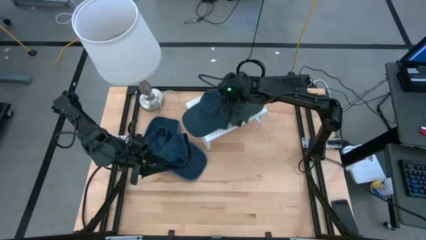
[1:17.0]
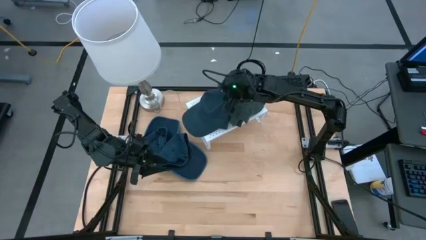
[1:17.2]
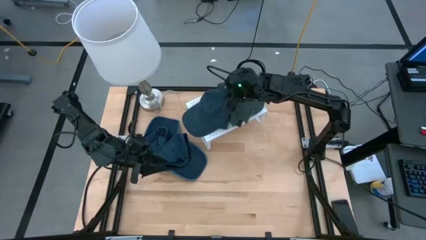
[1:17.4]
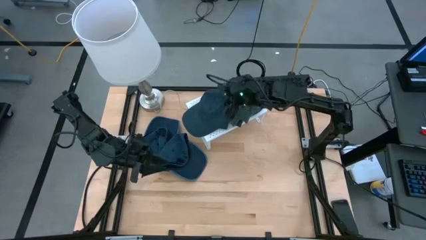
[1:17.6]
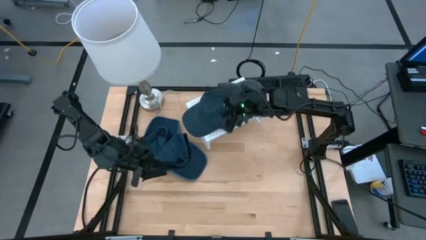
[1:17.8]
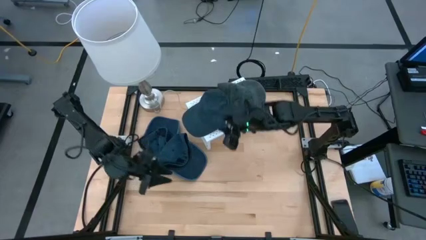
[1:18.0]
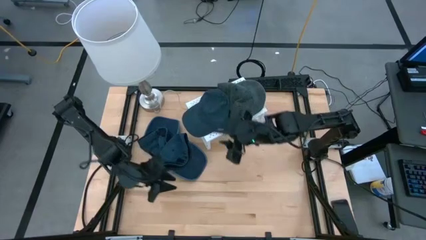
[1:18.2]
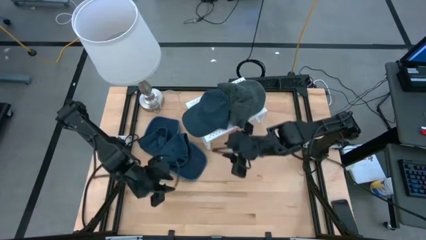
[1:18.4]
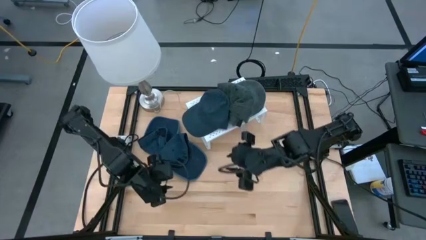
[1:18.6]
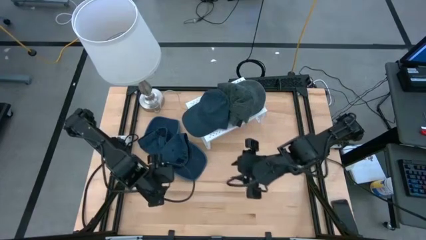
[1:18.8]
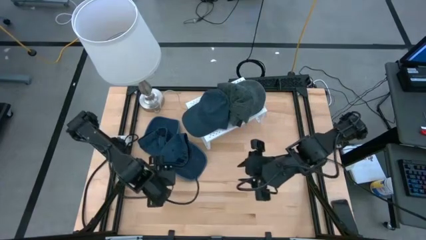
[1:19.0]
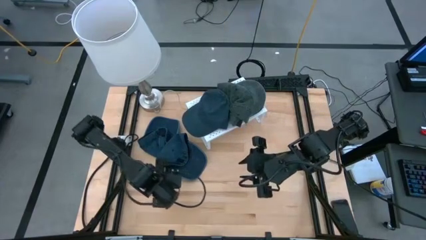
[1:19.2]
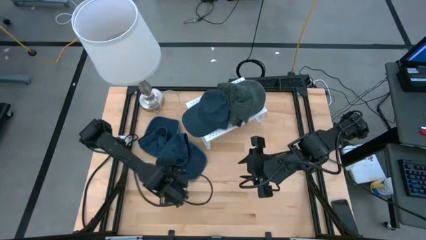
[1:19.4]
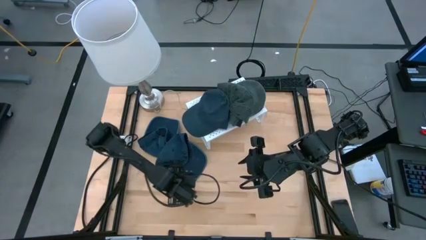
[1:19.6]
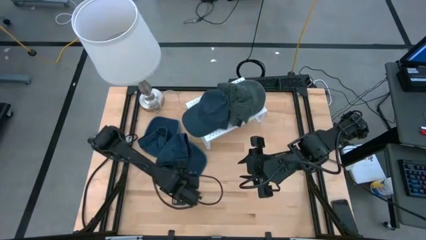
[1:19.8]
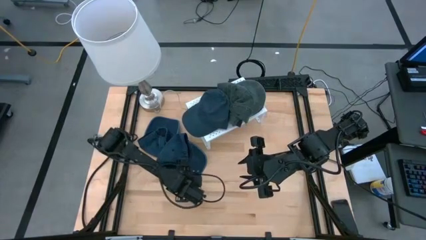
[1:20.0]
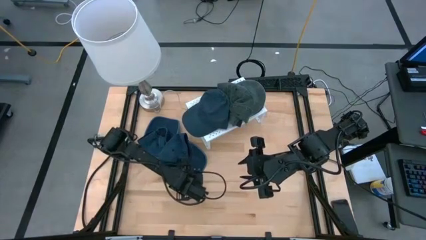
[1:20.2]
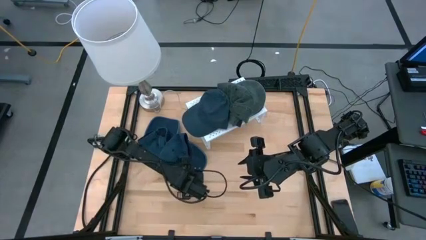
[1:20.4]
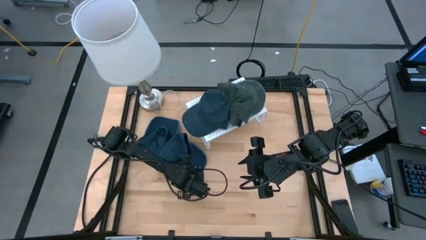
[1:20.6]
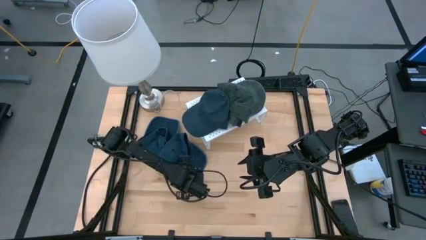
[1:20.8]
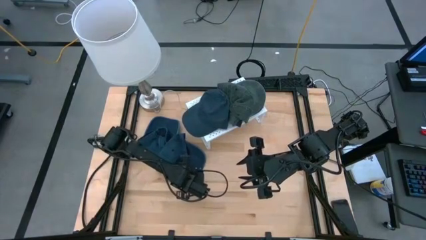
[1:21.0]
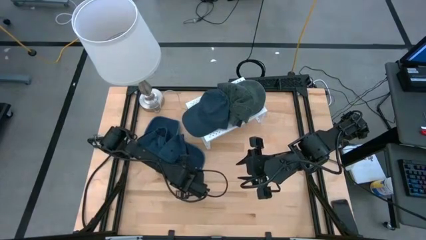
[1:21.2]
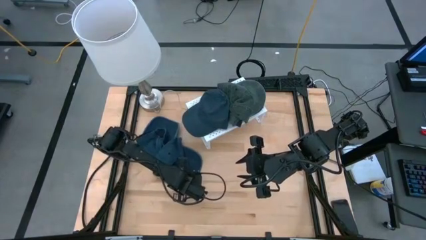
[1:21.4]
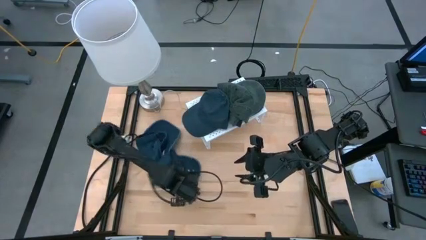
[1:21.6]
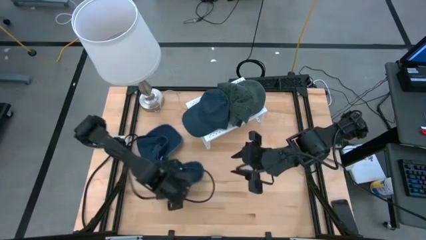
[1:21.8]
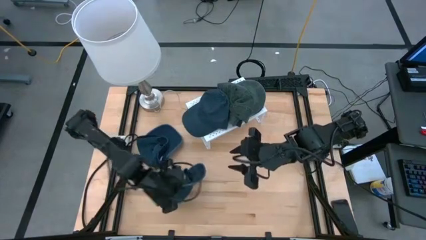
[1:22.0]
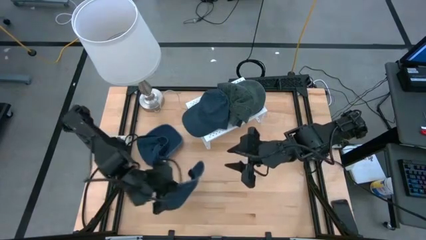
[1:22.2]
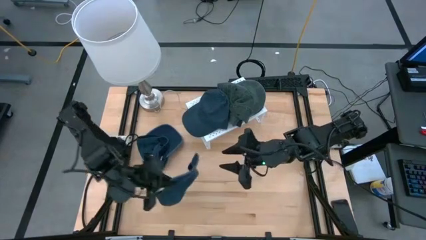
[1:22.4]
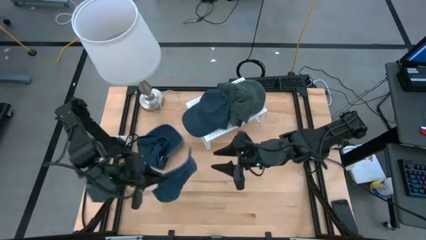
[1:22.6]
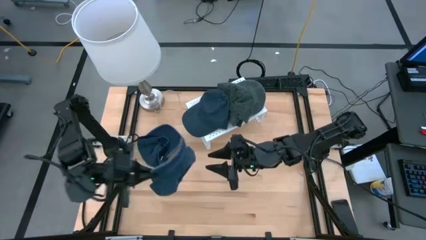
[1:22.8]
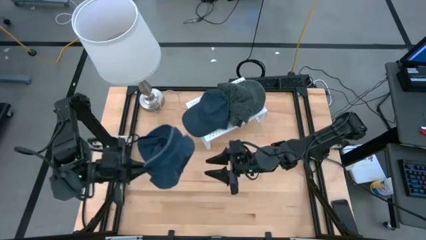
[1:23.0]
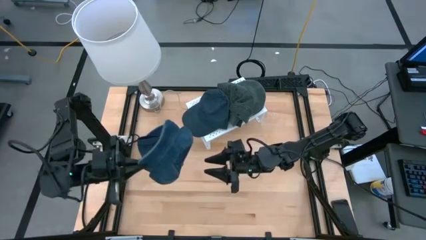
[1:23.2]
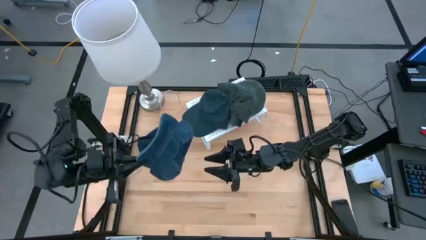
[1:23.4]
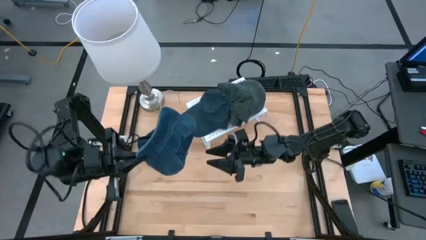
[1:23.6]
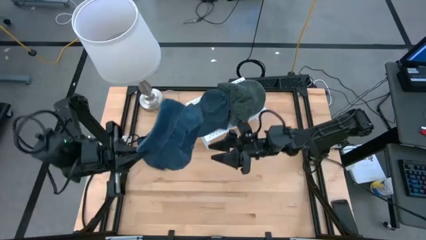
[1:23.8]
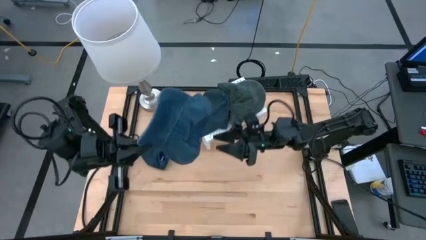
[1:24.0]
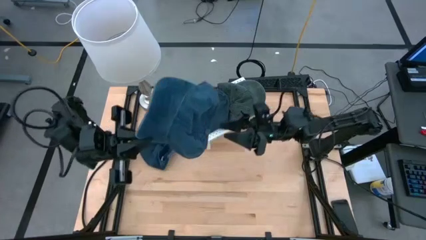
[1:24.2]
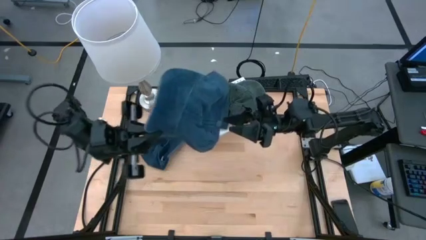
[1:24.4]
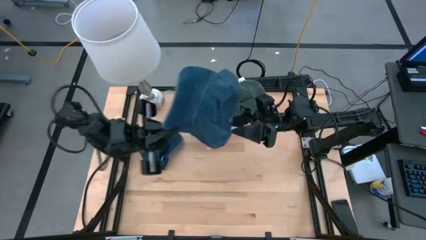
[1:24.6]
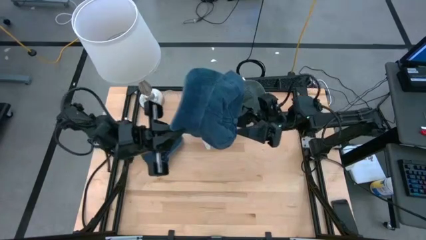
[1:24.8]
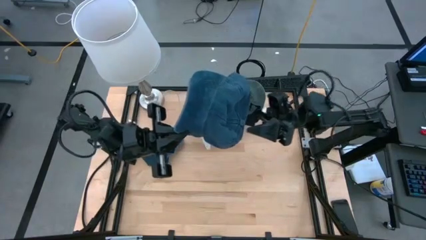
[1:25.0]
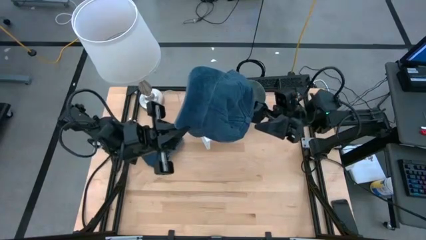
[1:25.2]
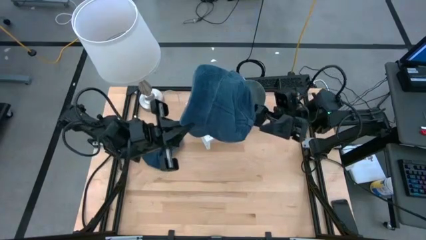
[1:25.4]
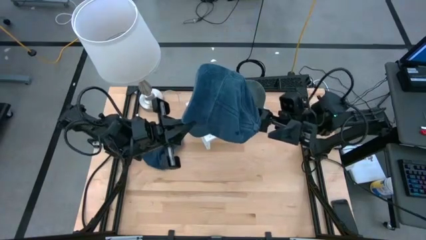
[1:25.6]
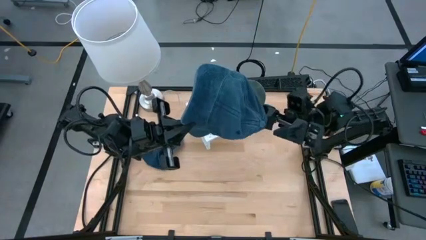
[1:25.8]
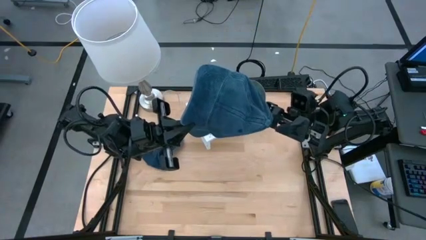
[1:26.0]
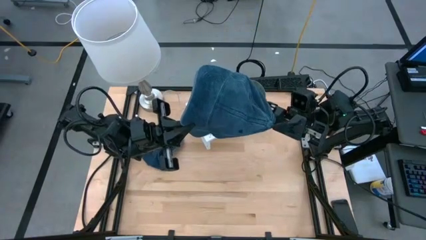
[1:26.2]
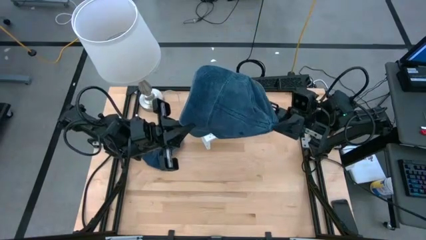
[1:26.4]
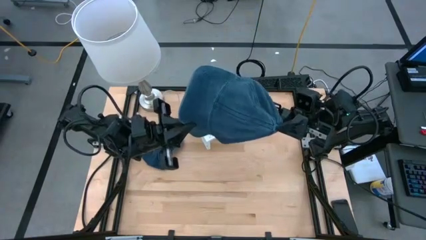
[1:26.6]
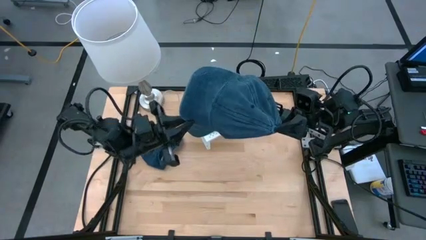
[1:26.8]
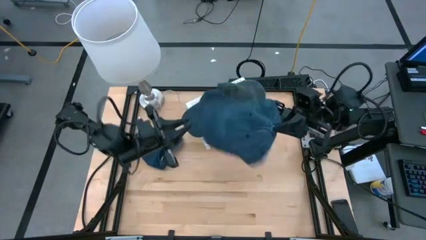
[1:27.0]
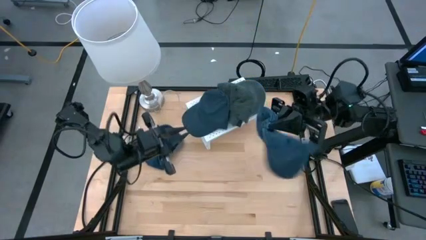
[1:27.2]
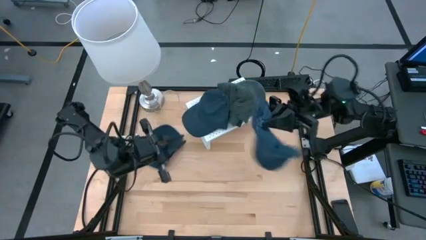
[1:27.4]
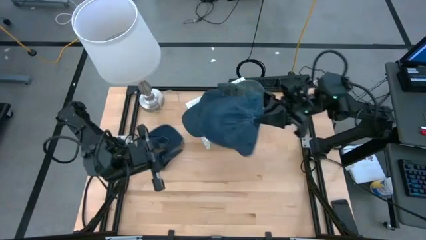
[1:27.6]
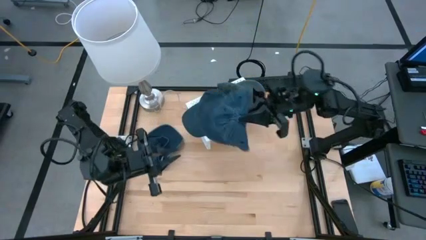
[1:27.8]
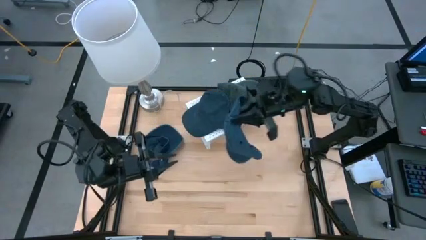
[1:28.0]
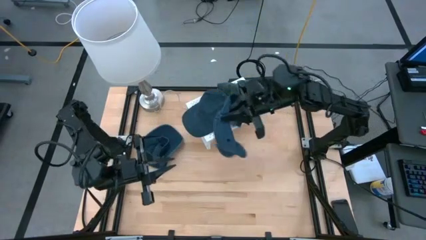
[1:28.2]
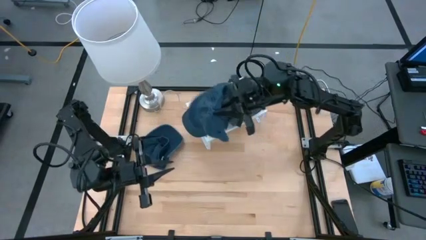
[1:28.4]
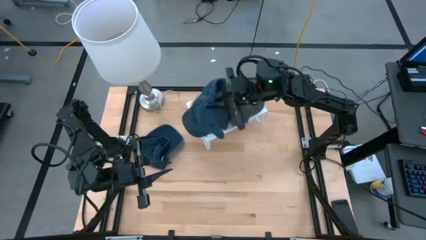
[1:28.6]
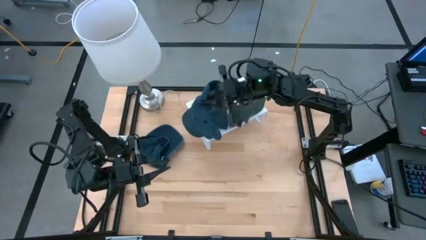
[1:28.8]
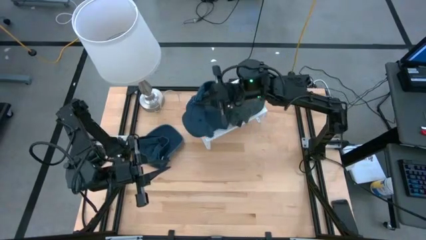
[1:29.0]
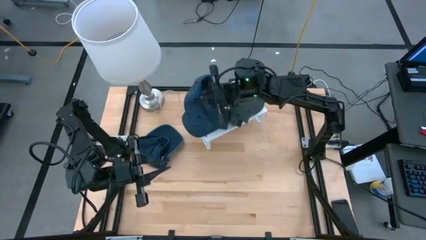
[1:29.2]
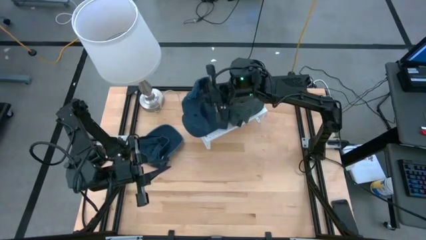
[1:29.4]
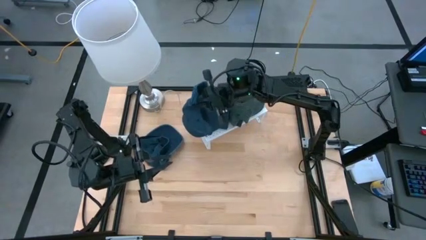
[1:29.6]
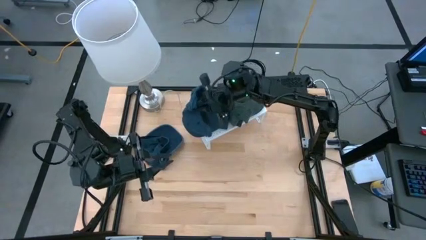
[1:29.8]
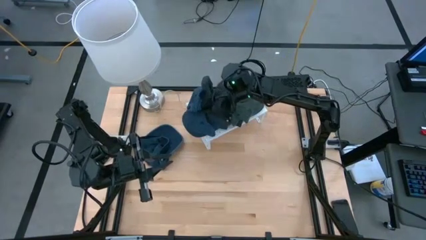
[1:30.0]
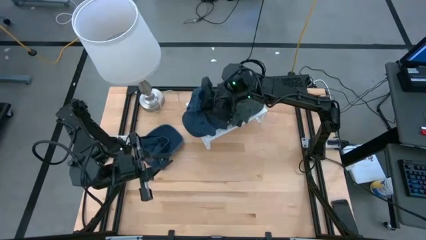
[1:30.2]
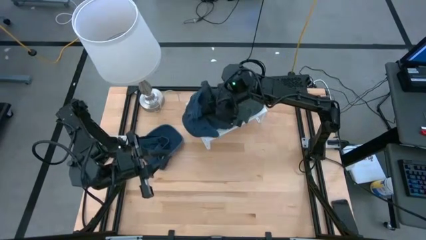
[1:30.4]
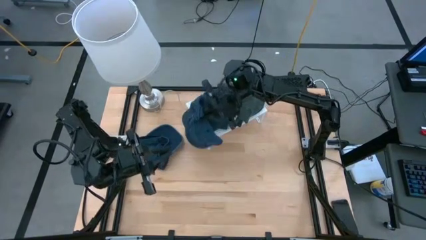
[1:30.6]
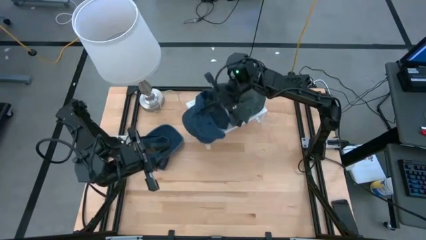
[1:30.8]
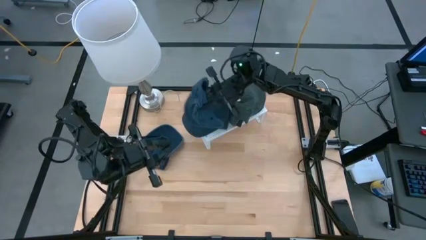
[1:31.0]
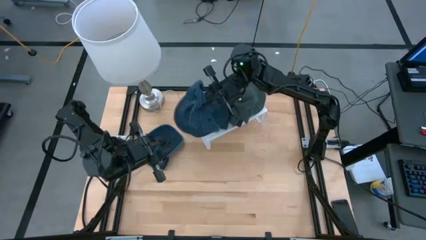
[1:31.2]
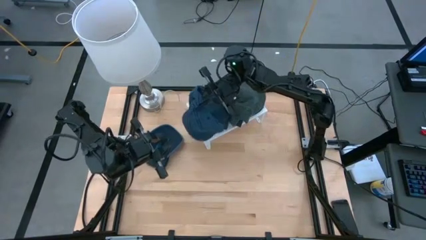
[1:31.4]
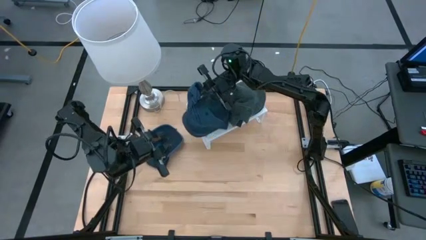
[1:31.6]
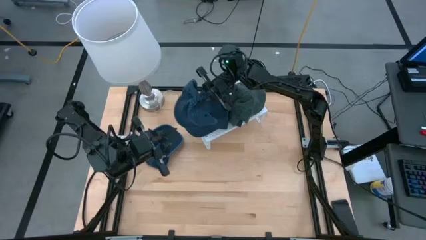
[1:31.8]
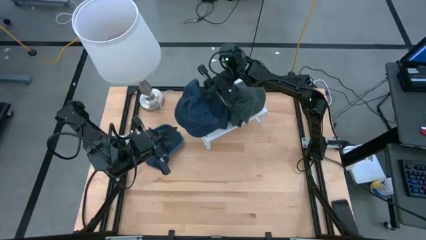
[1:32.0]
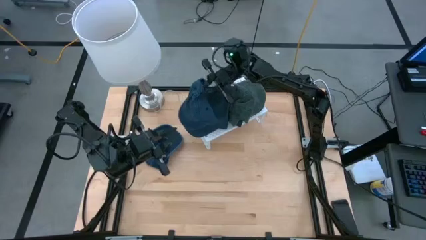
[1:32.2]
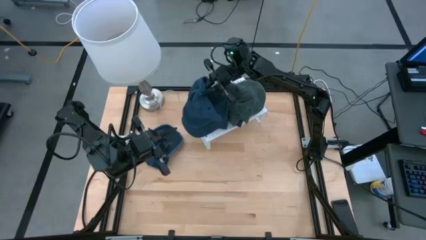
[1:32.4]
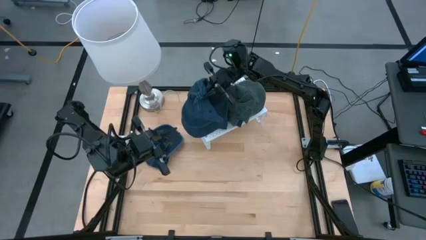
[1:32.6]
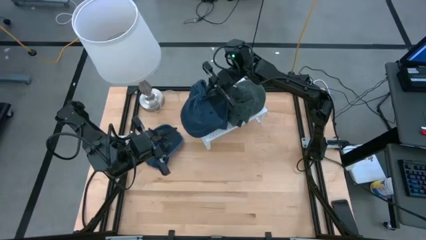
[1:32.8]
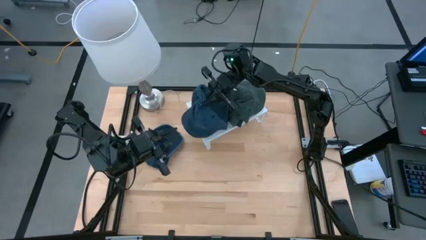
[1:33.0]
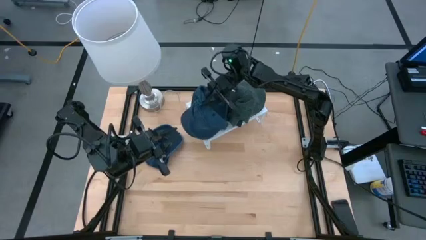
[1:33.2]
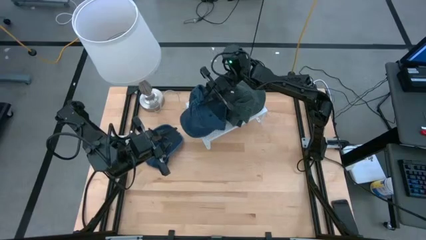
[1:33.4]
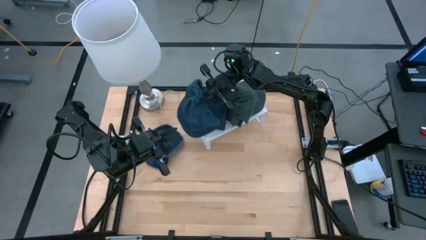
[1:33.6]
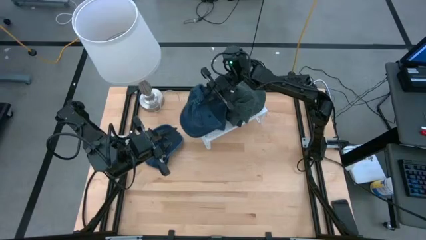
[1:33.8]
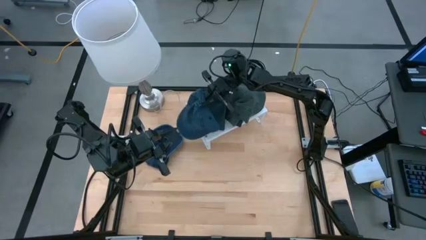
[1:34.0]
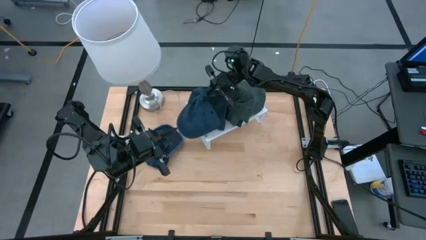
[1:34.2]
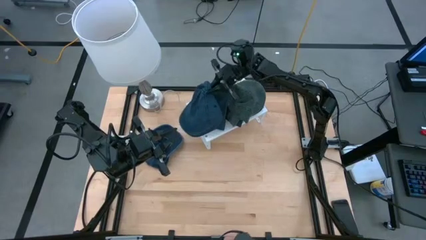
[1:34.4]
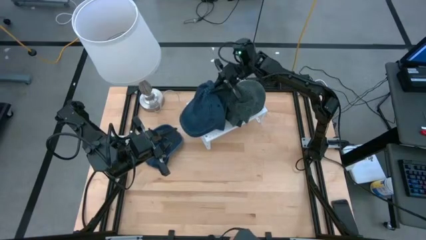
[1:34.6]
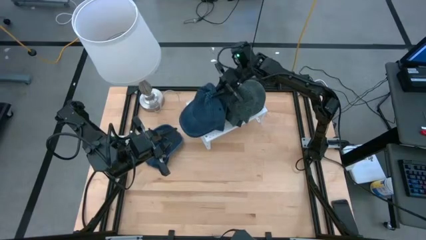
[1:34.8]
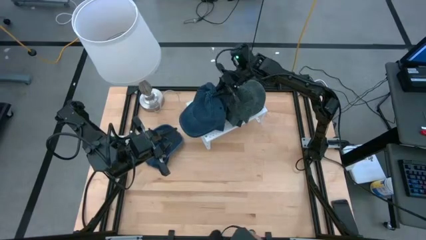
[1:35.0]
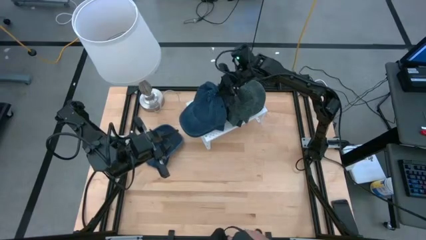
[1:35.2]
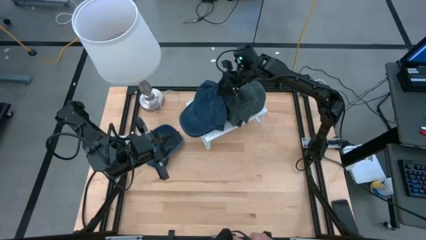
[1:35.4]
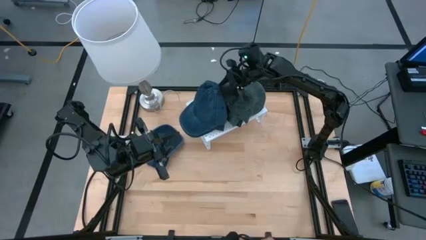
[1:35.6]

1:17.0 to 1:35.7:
Task: Pick & Place hat
Stack the blue cap on top of the other blue cap on the shelf
